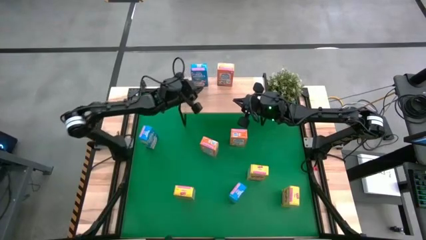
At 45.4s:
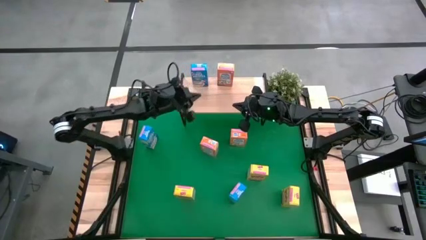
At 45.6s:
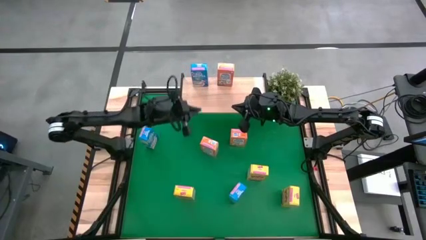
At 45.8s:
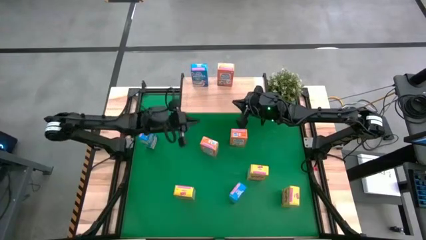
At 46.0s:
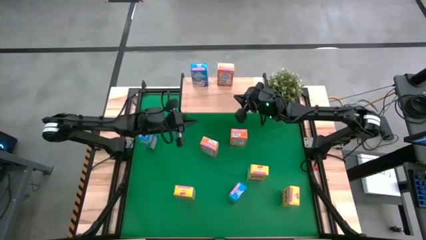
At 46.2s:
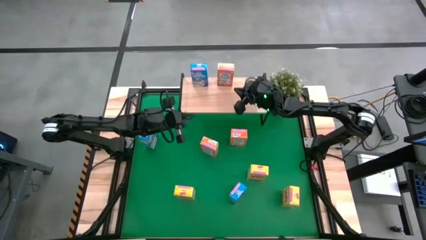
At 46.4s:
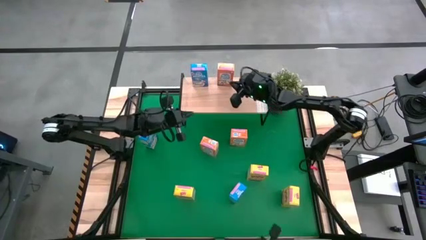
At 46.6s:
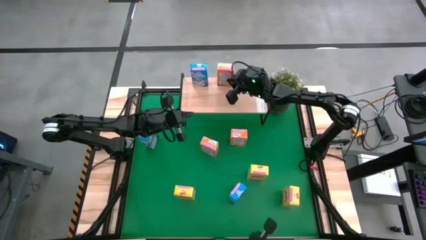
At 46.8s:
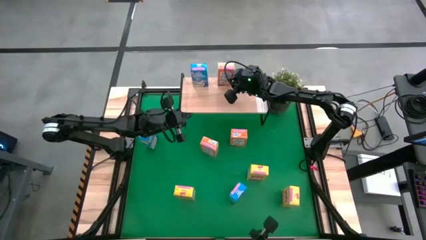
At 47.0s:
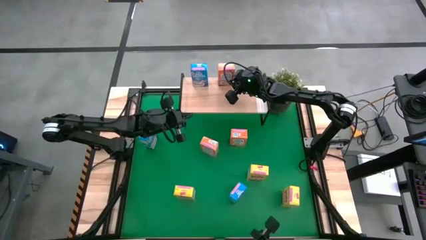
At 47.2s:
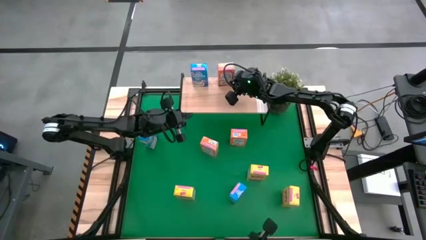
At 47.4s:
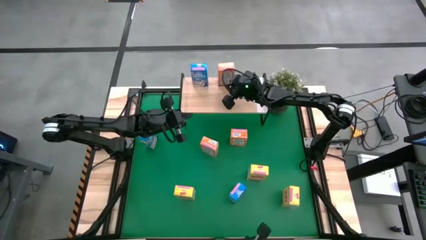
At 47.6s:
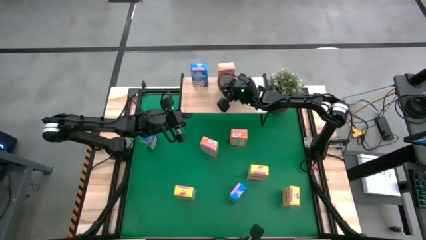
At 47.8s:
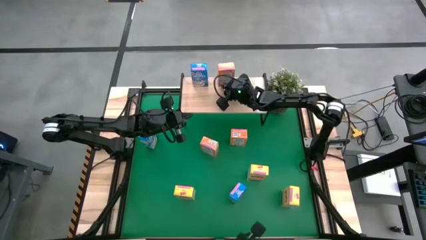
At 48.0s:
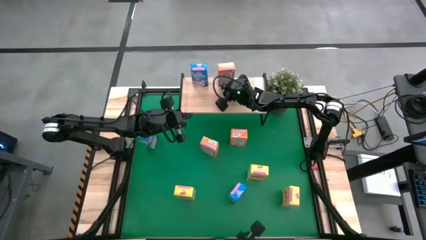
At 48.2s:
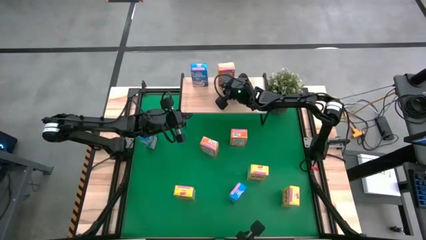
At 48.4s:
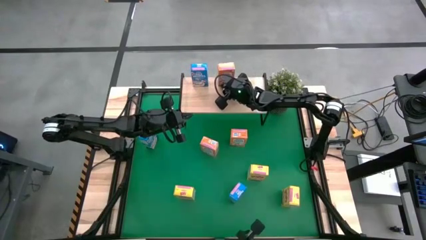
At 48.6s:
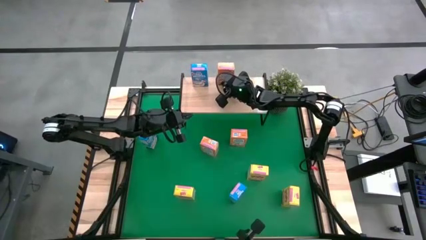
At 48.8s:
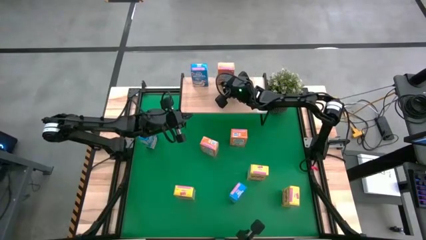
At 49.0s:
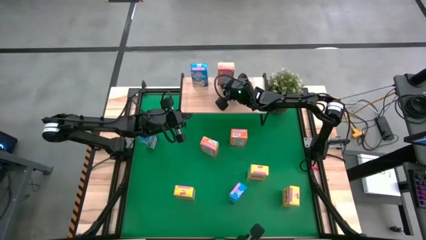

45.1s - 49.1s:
Task: Stack cereal on shelf
Adjust the orange cereal box on the shelf

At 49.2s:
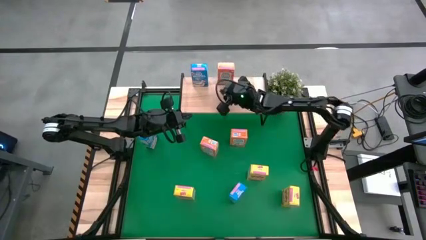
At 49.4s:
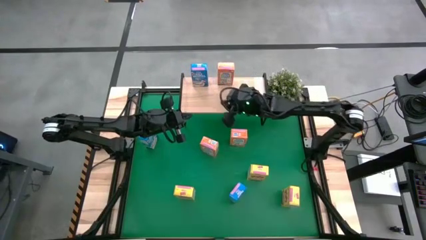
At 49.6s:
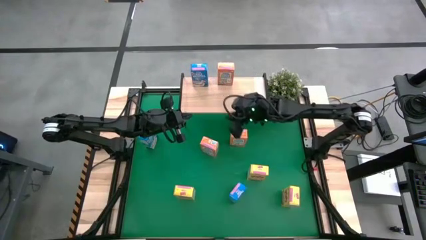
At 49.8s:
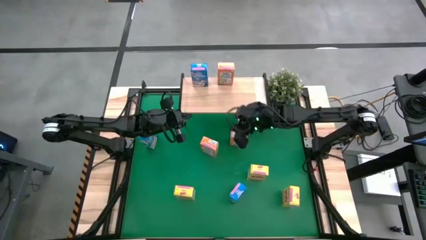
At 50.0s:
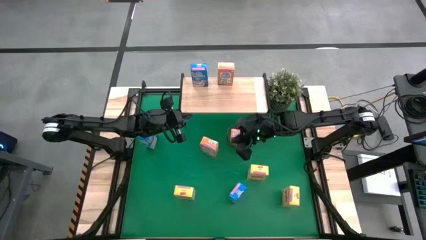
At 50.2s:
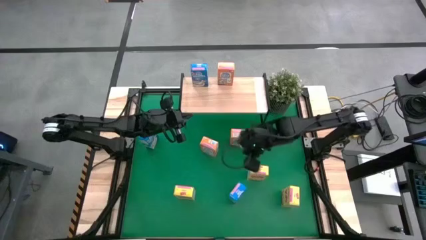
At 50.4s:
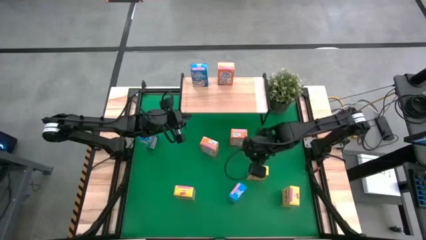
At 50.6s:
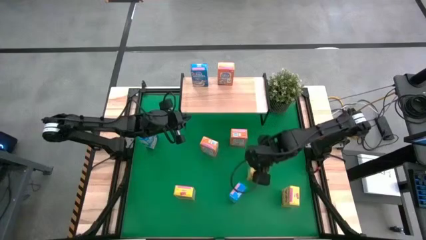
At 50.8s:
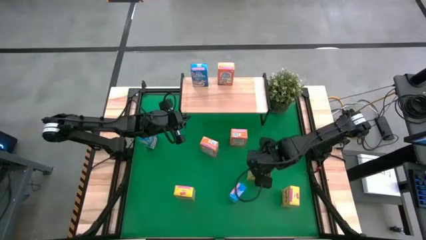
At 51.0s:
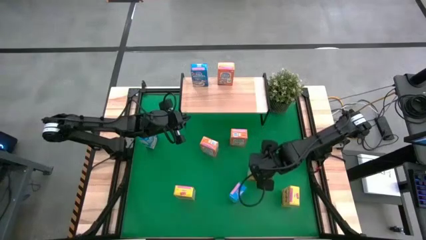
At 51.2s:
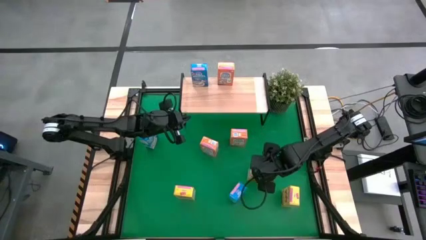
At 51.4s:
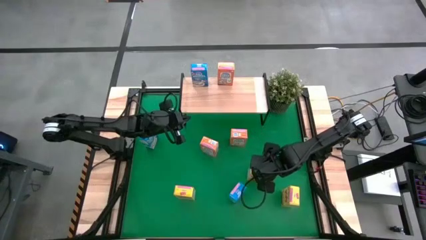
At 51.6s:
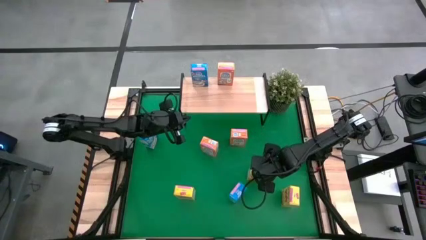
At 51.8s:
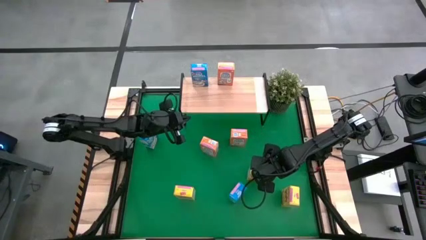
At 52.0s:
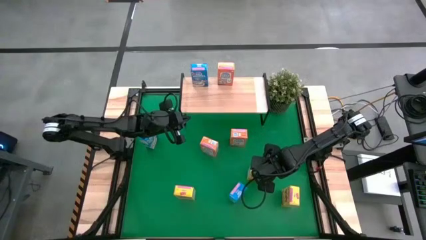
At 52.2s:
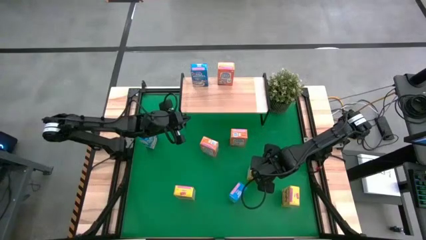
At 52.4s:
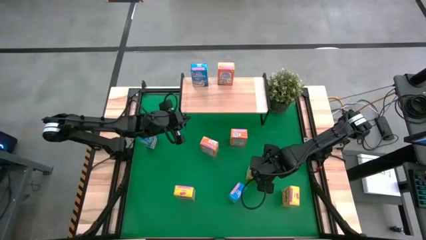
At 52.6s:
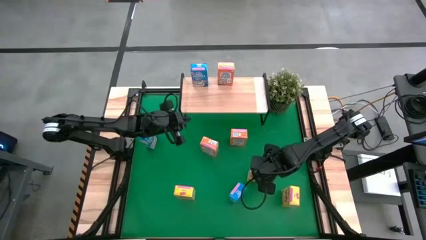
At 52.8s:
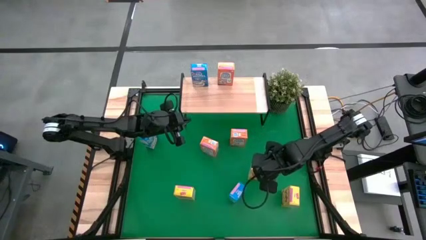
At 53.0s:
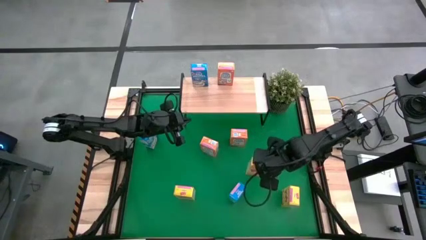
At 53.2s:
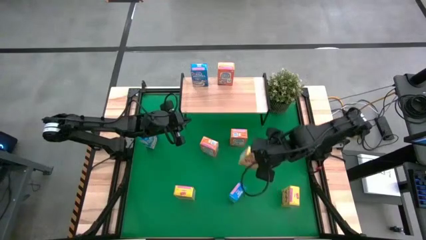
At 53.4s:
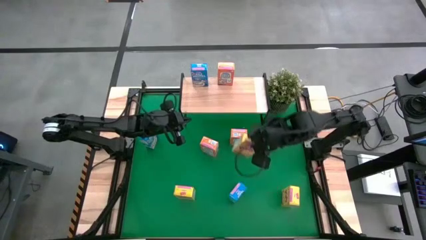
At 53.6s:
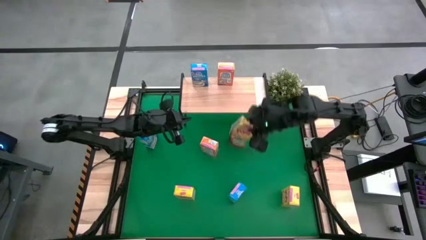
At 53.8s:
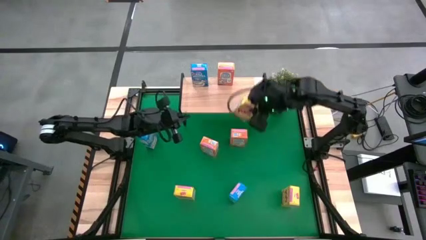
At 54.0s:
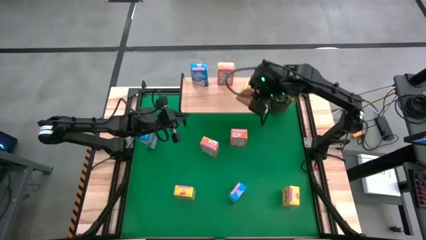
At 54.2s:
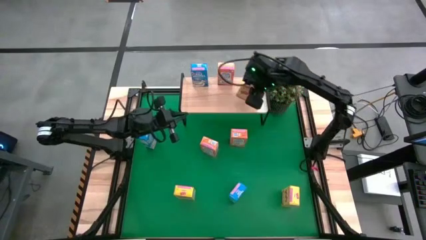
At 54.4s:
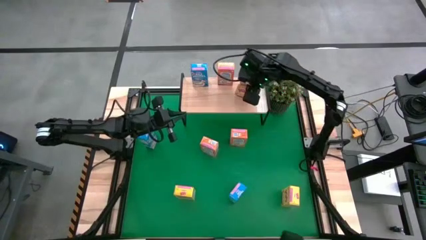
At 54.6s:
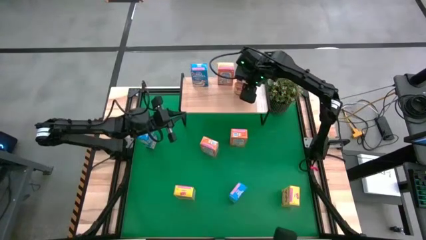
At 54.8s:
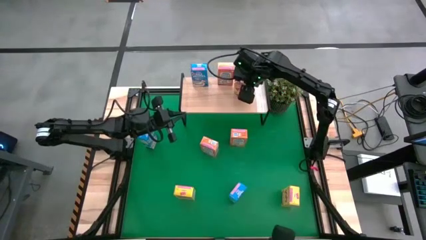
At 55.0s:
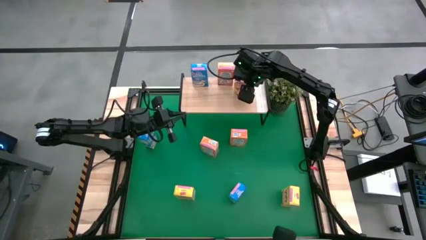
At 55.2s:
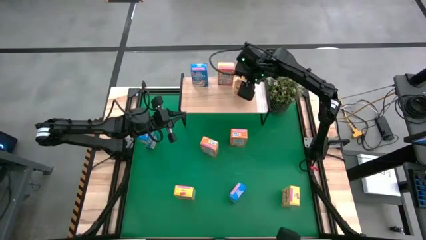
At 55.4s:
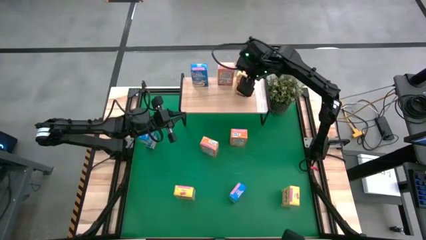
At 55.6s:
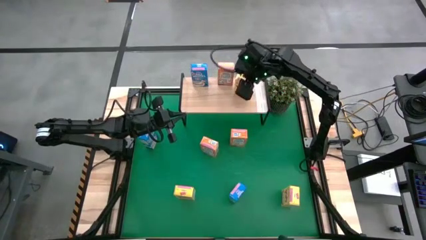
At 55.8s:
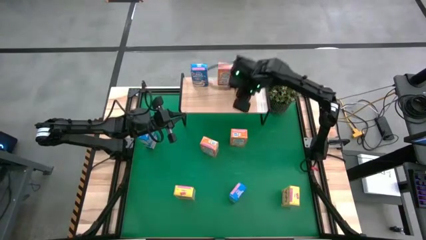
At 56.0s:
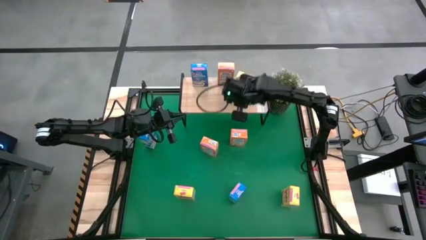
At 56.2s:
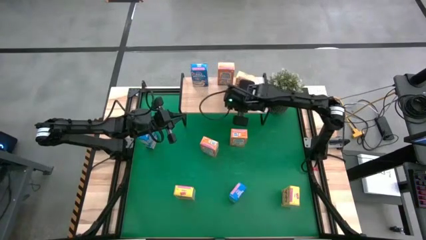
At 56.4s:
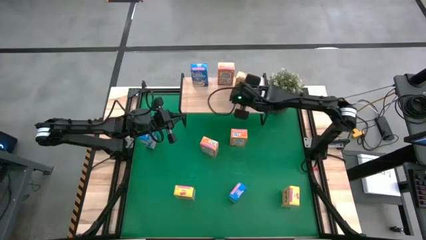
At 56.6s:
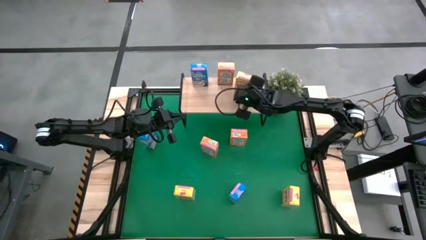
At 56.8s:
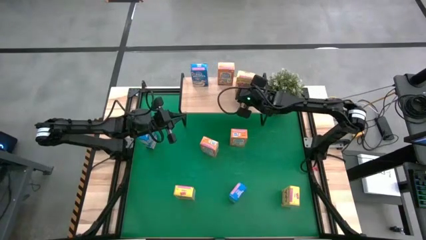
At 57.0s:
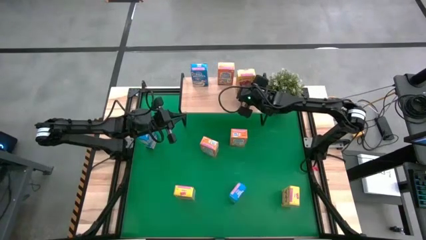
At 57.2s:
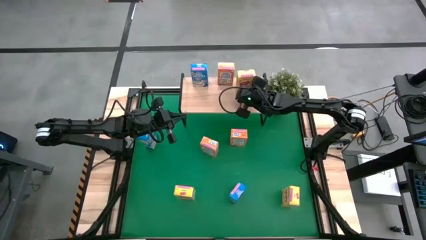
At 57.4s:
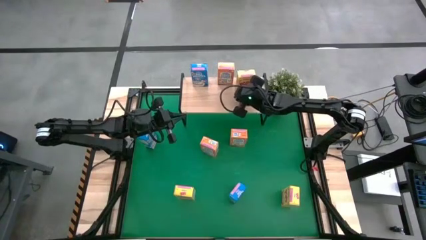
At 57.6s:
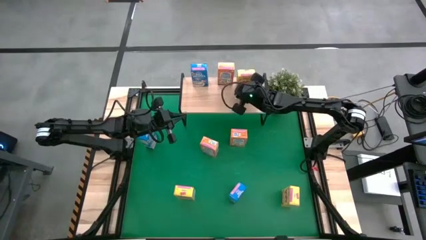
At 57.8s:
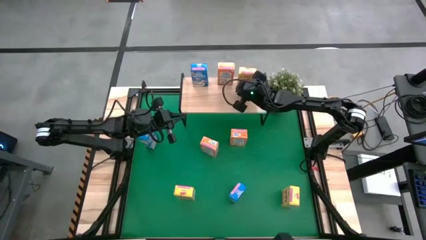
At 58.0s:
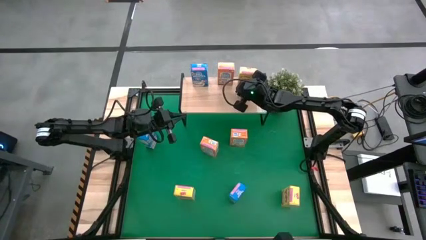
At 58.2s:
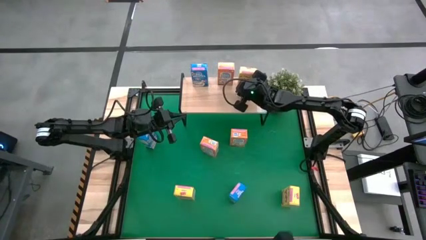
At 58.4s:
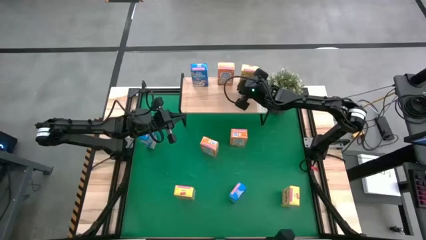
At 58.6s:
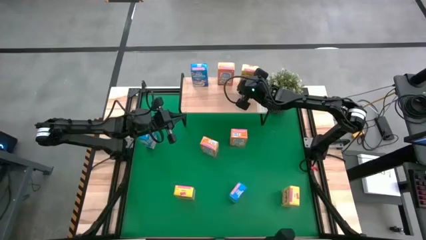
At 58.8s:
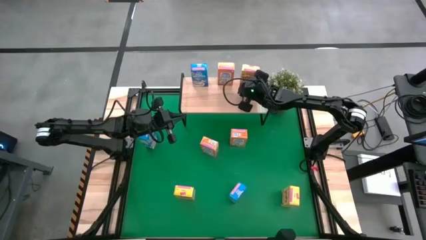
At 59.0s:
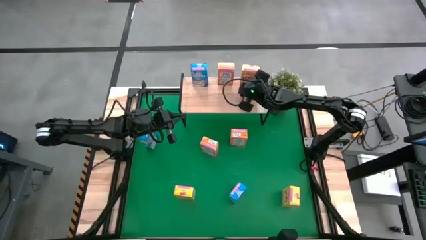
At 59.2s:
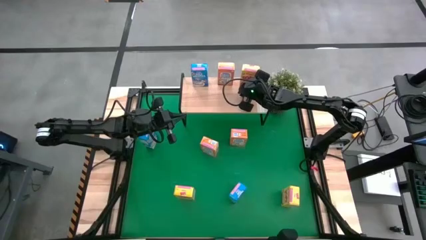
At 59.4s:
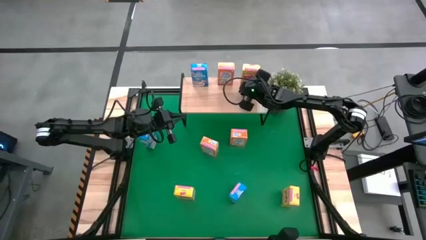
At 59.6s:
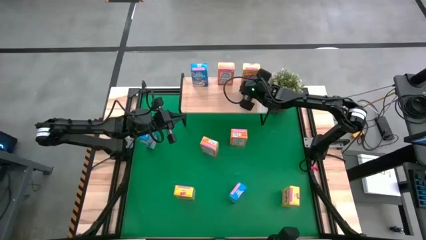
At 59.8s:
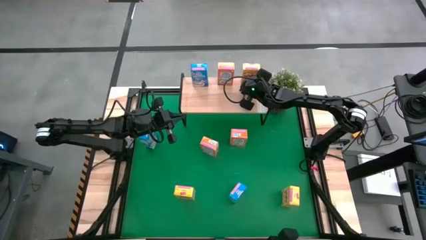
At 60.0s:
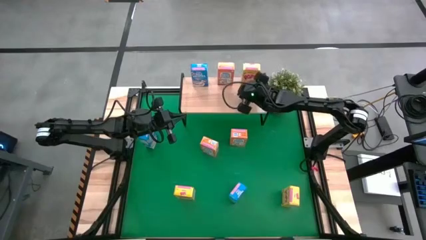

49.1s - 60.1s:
Put the top yellow cereal box on the shelf

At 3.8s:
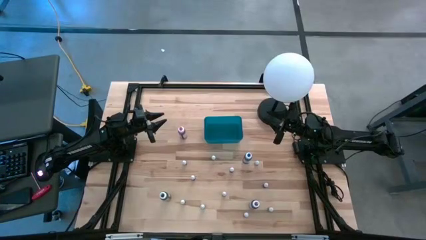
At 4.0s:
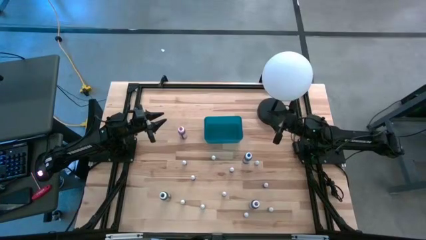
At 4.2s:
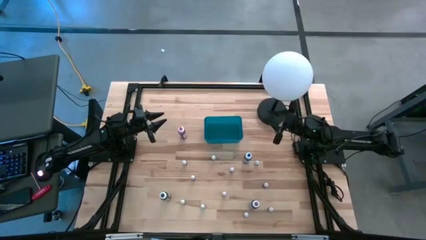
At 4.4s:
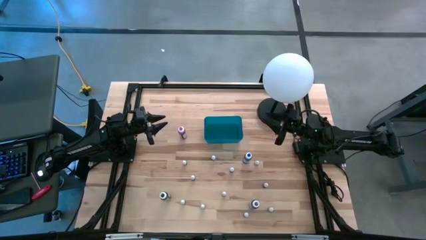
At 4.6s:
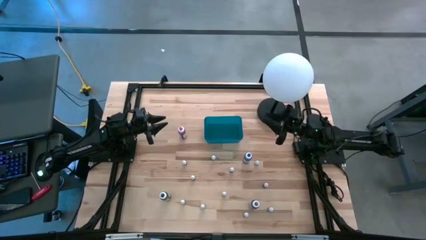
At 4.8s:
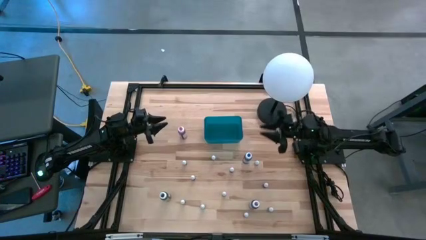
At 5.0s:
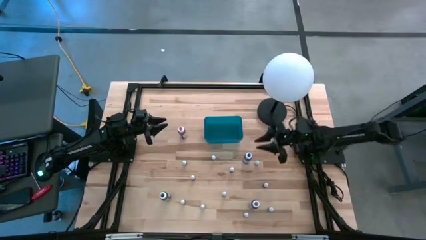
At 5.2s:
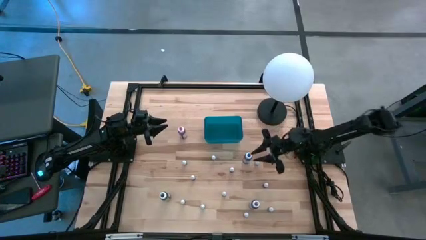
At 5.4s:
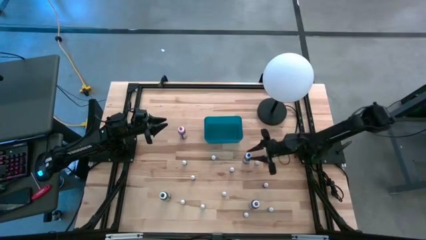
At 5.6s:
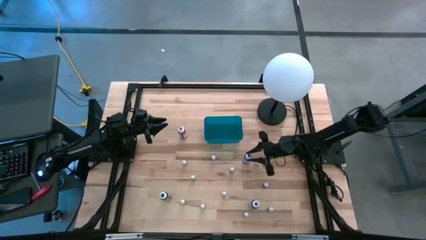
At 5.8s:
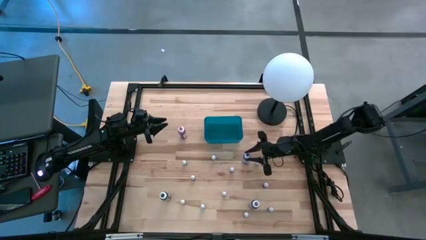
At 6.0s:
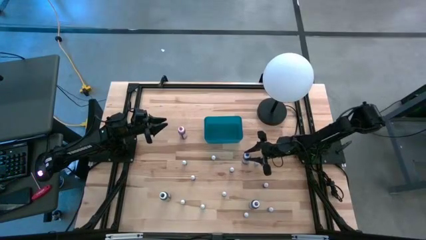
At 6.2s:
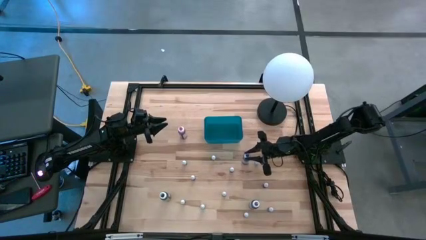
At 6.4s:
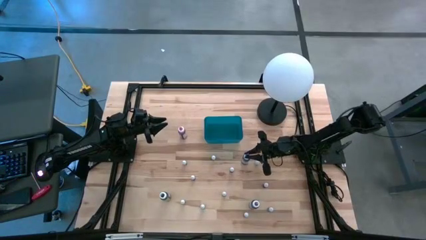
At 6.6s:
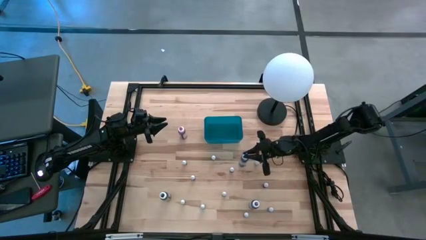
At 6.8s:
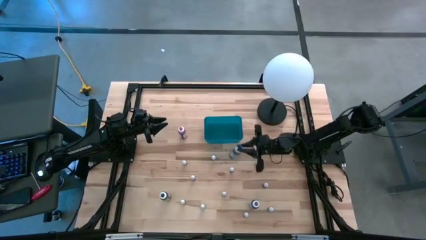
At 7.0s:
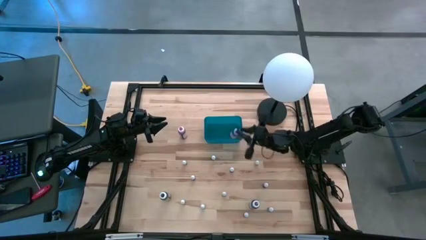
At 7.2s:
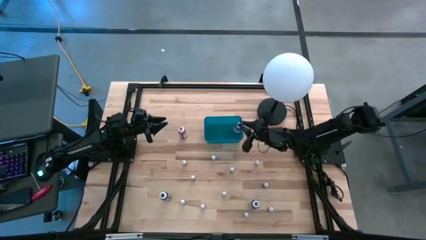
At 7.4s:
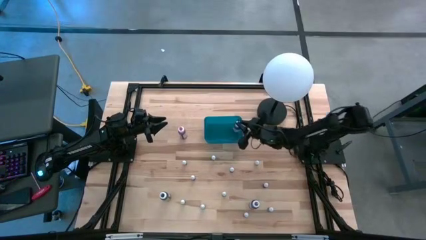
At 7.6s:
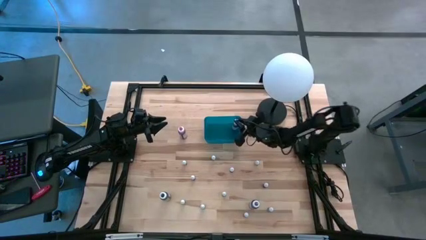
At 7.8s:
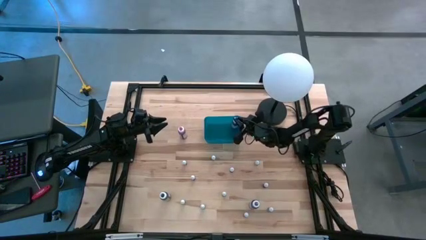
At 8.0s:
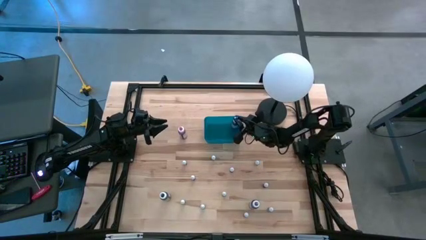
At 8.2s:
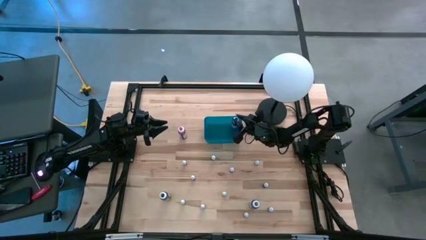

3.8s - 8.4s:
Task: Pick & Place food coloring
Put the large blue food coloring bottle into the blue bin
